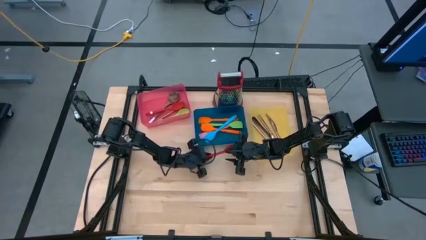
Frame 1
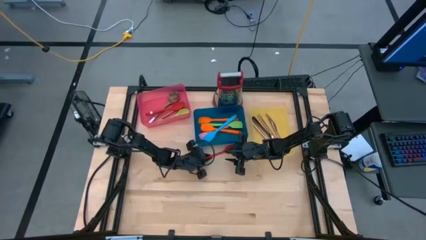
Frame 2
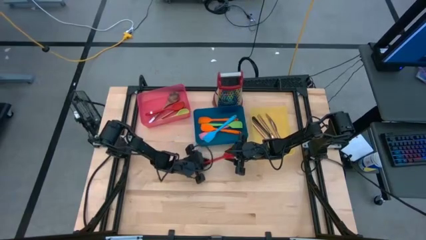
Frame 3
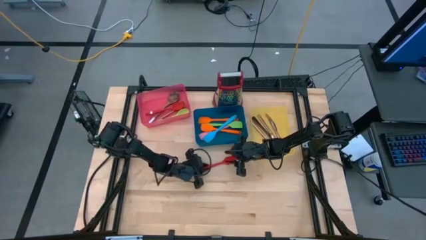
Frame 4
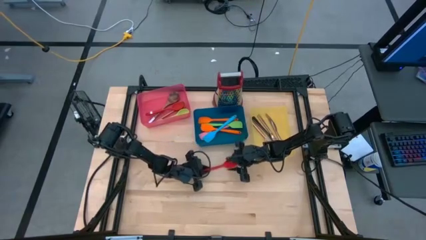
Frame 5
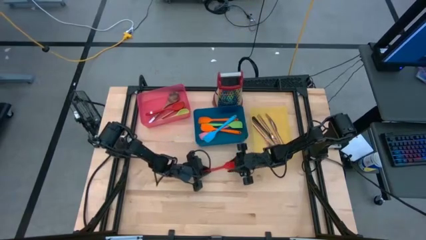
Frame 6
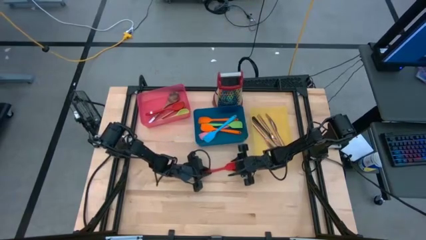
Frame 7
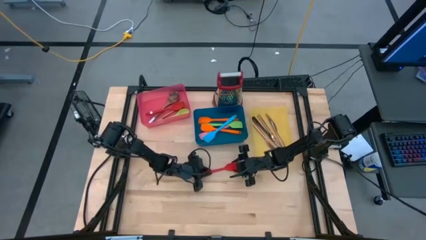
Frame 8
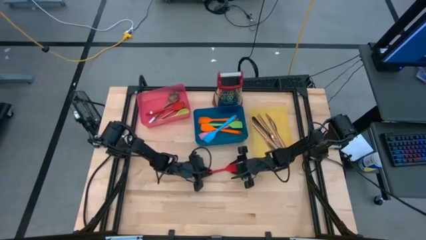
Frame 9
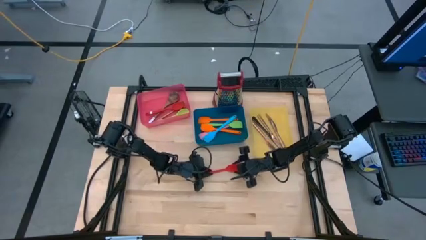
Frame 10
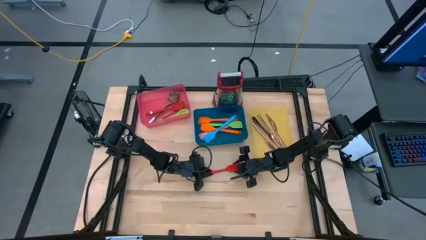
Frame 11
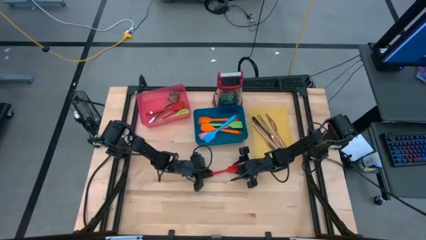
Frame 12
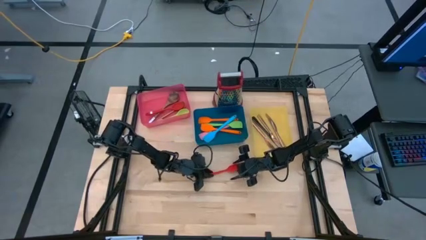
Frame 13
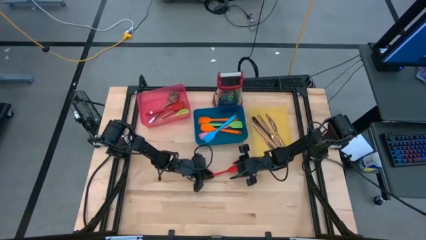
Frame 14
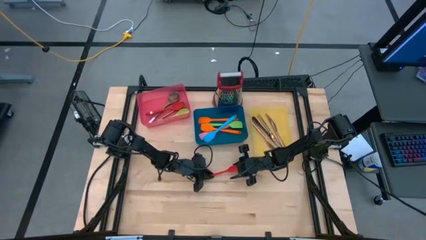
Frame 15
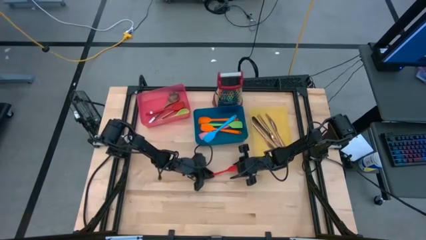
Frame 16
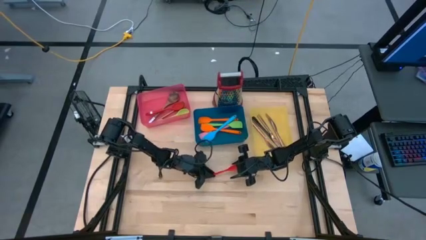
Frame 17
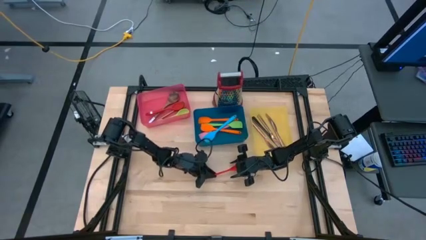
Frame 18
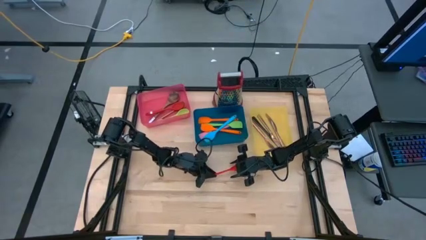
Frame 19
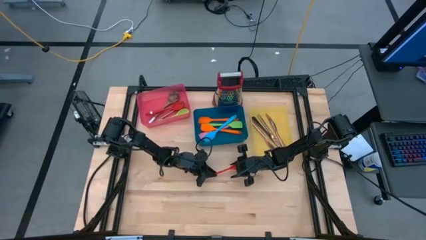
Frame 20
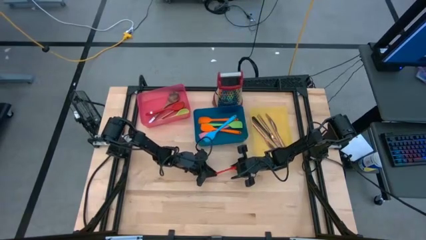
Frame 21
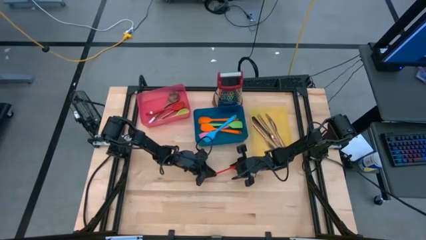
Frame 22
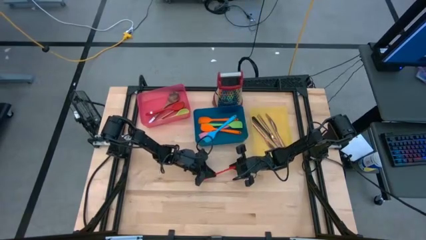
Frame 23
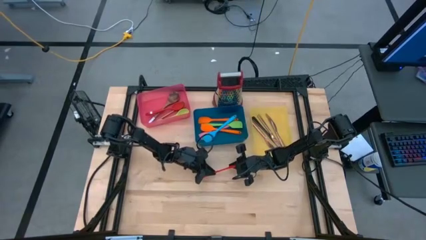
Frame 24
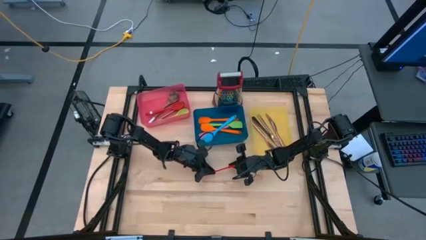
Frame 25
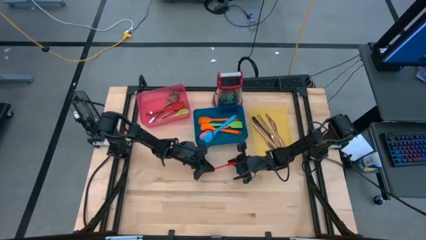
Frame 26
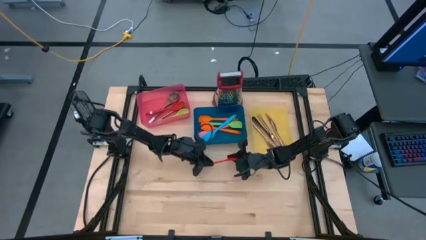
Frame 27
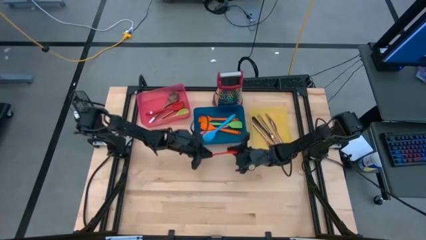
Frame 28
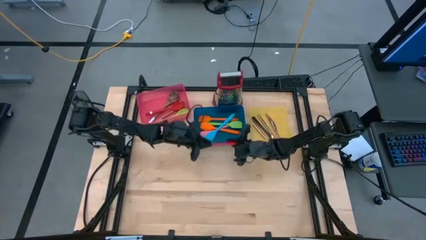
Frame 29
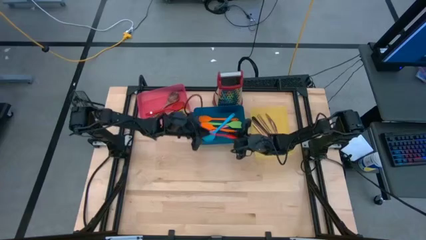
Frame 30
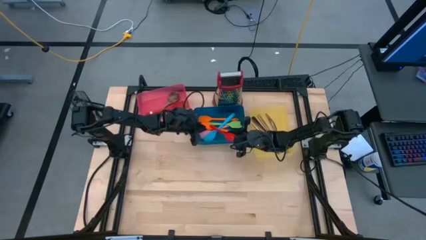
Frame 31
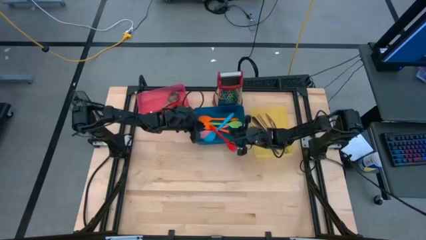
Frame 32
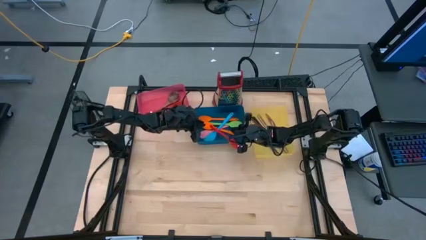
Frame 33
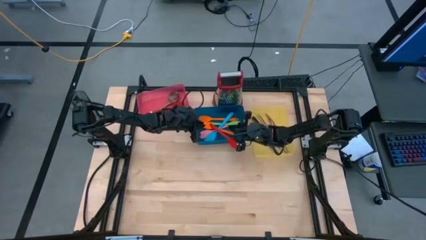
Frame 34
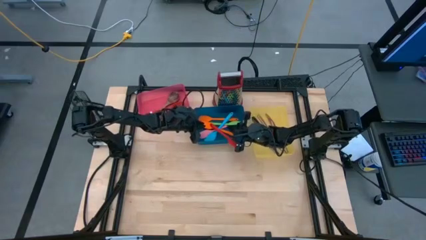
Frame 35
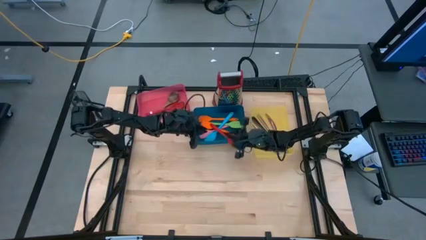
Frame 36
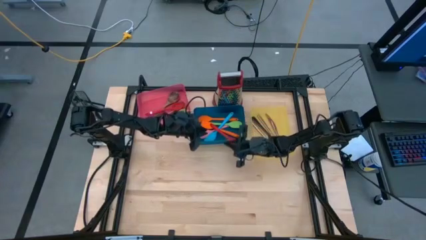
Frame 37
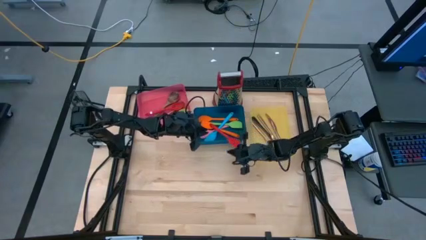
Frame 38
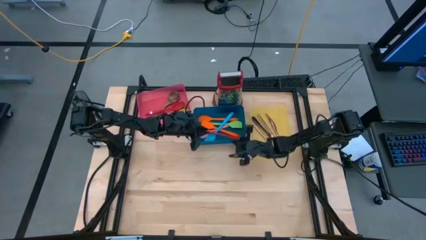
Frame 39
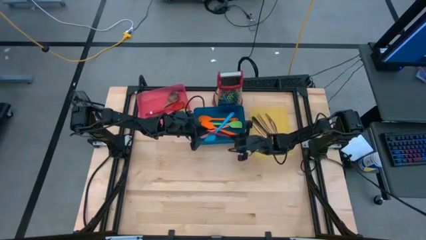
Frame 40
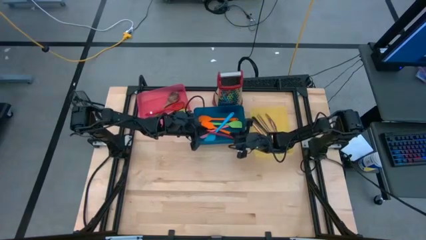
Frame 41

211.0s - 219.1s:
Task: Pick & Place Kitchen Items
Put the red spatula into the blue bin

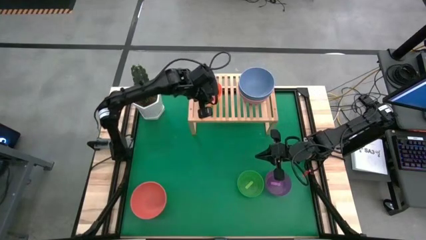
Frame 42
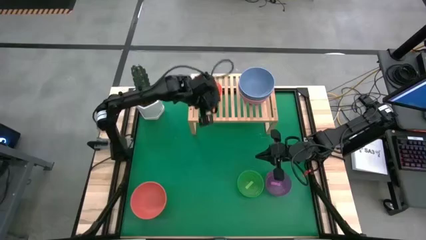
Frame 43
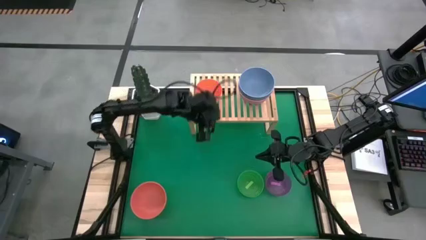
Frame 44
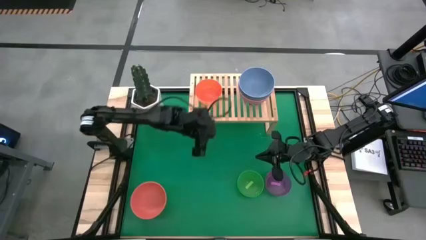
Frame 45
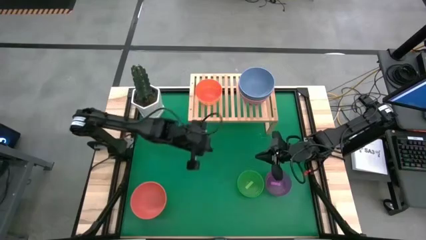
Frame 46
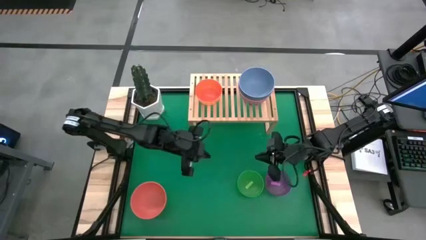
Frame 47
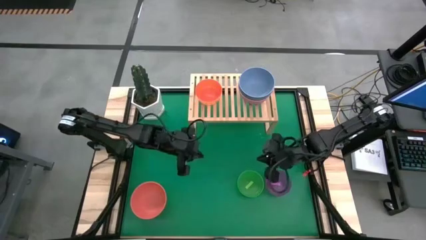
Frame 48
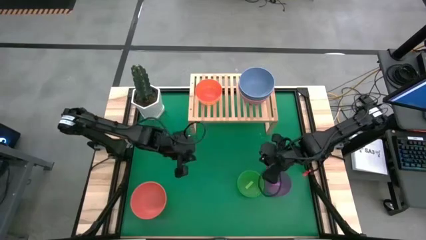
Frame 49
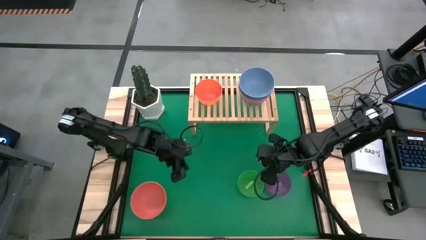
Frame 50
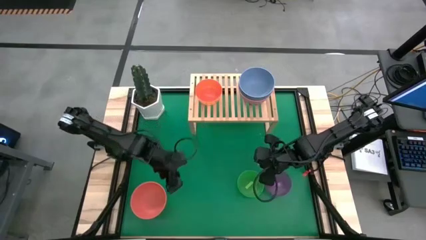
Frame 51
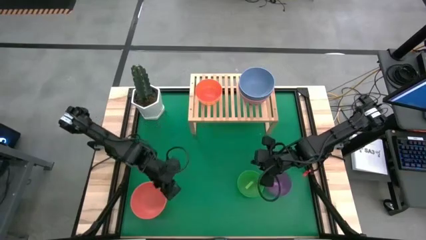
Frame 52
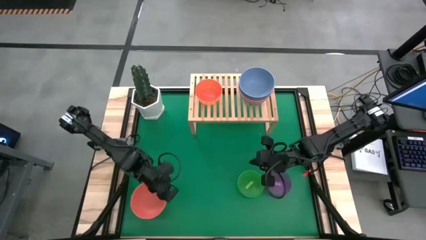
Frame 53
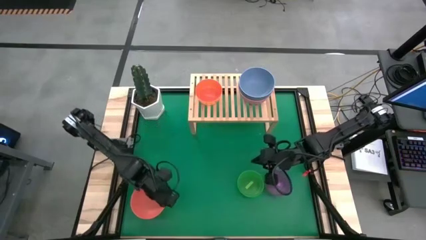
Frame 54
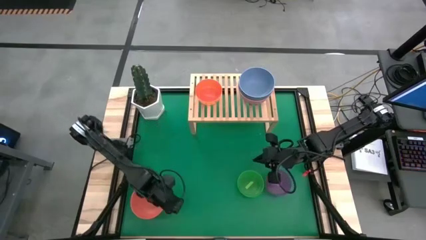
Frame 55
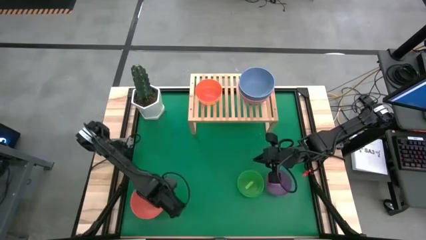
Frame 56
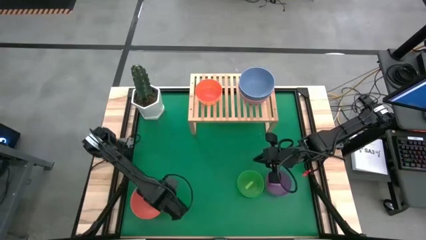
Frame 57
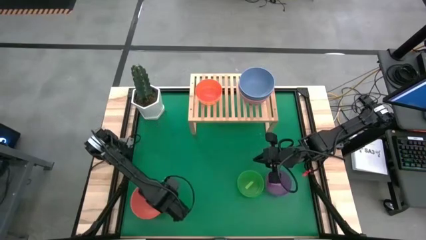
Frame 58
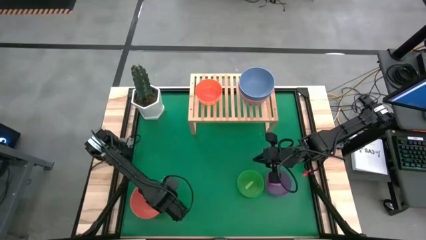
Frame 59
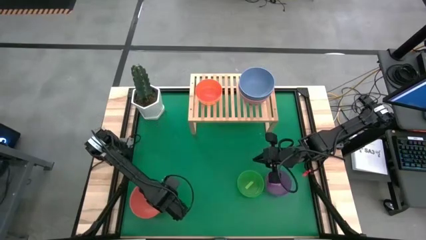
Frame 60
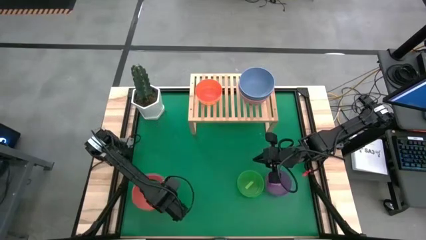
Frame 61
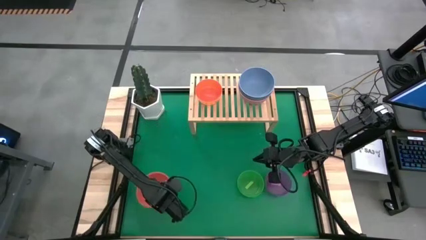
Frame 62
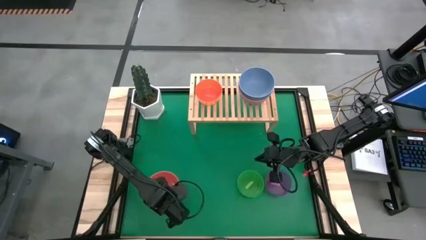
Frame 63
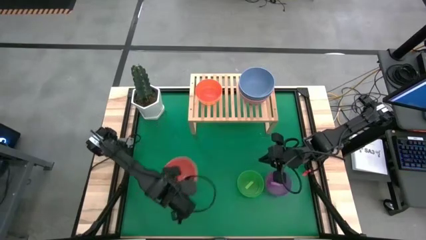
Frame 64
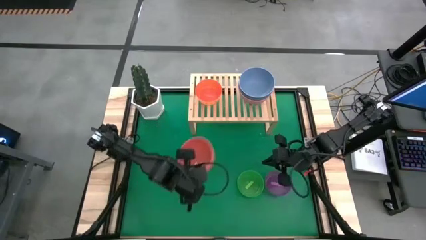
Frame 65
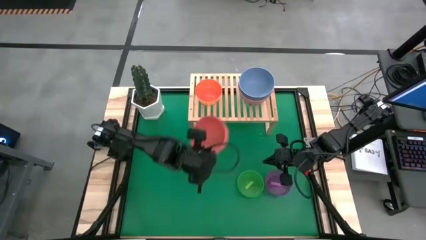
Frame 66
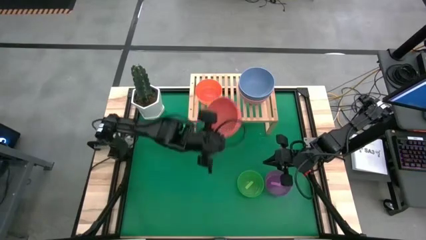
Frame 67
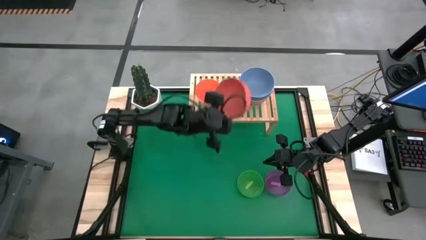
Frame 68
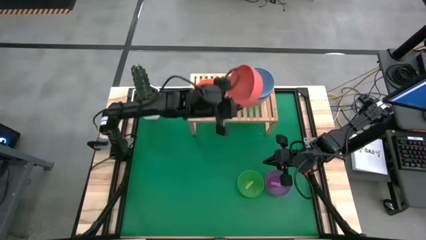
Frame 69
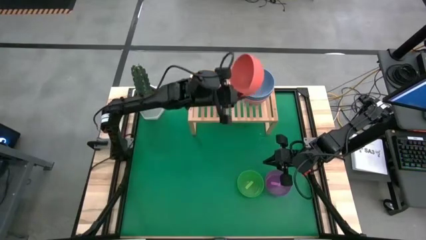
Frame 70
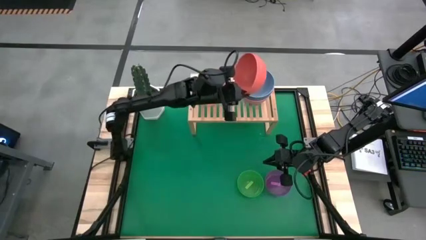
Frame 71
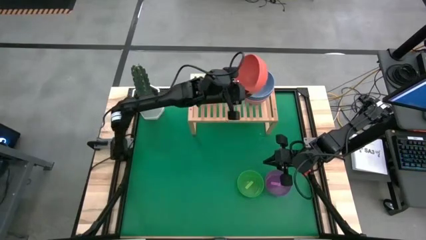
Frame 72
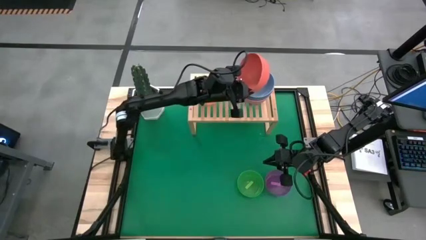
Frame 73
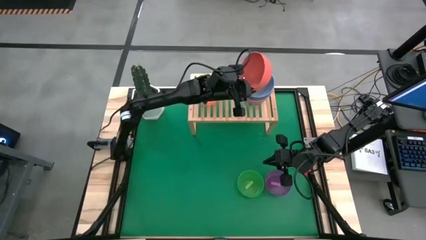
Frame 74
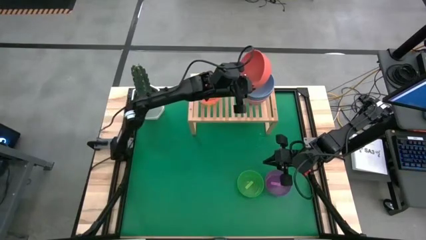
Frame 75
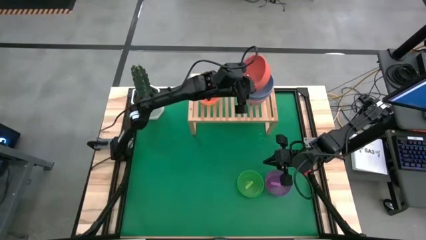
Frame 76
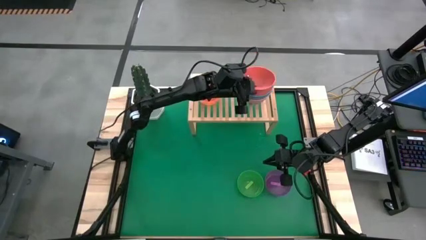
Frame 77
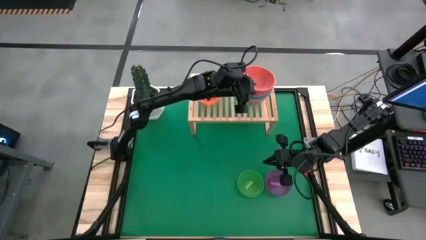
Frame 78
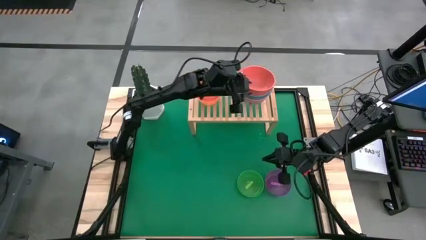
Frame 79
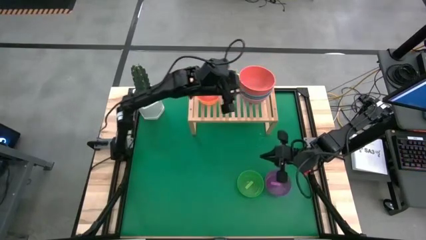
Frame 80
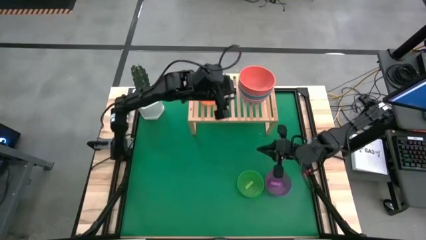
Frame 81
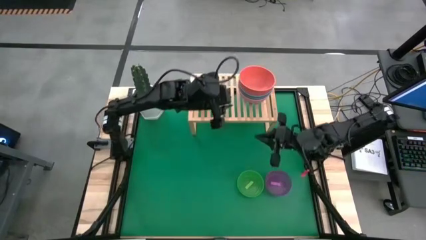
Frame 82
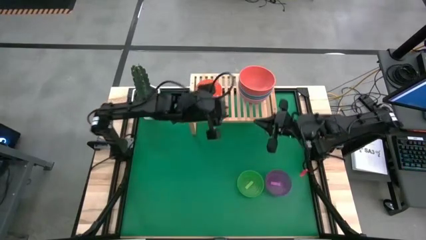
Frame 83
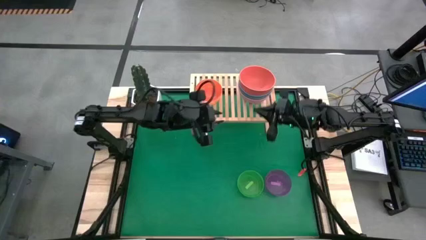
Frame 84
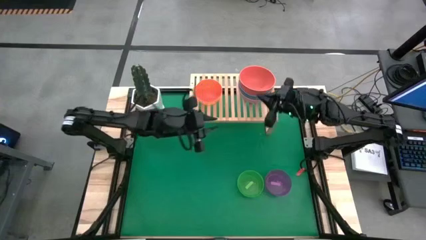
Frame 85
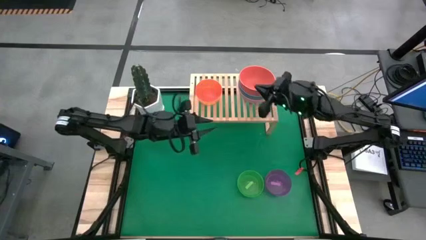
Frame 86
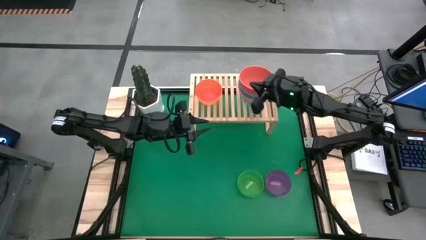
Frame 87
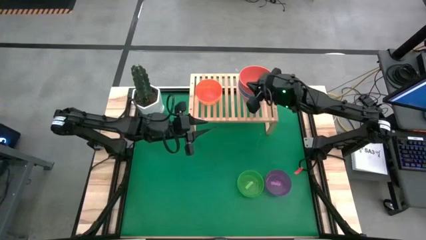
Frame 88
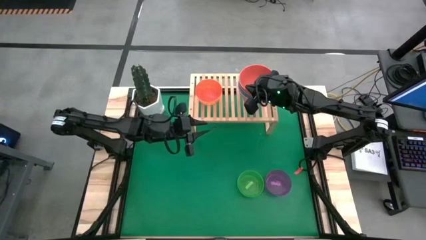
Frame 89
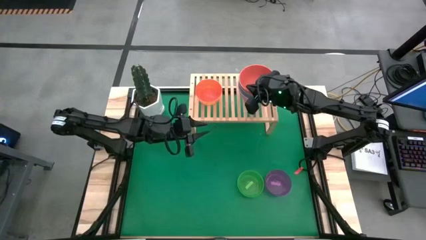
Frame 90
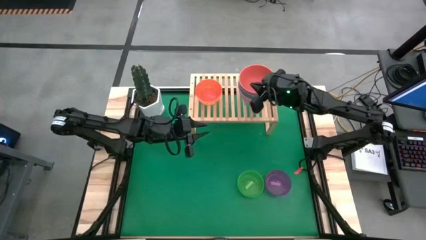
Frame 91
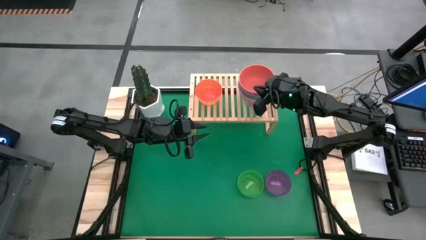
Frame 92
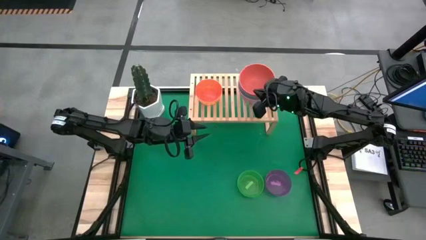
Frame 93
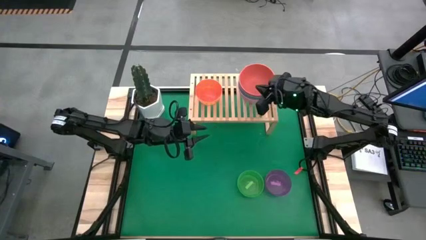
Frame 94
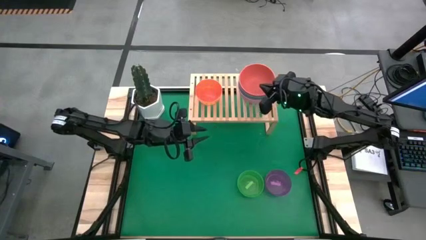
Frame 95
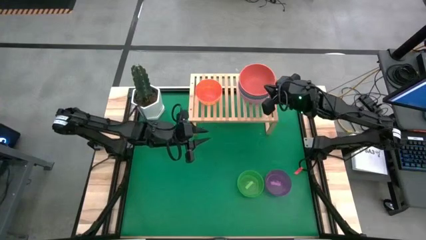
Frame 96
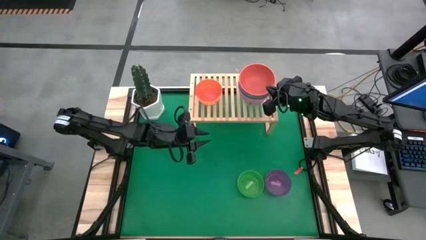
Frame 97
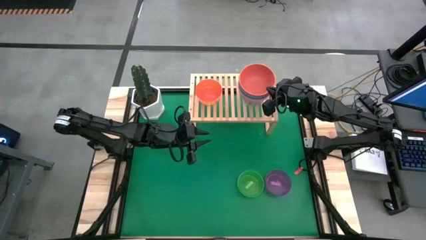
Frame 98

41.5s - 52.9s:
Task: Place and stack bowls onto a shelf
Stack the dark orange bowl on top of the light blue bowl on the shelf
